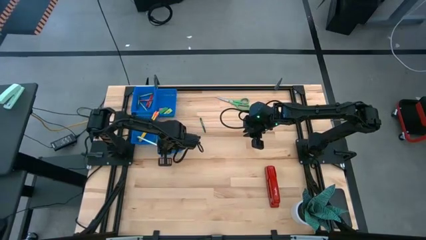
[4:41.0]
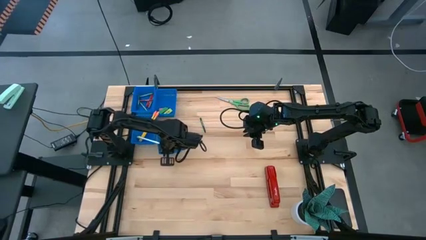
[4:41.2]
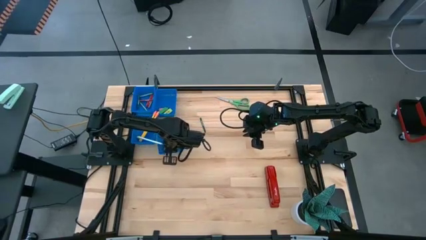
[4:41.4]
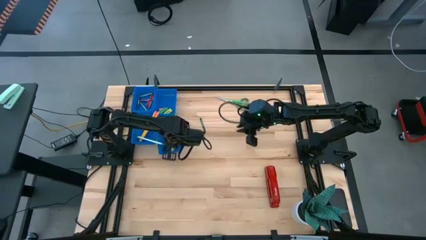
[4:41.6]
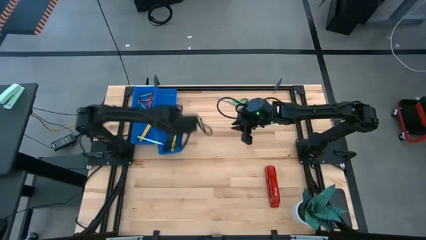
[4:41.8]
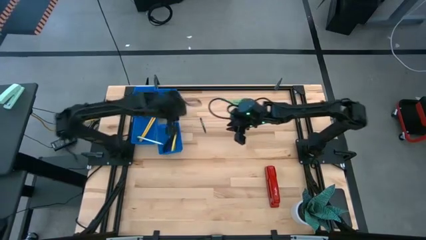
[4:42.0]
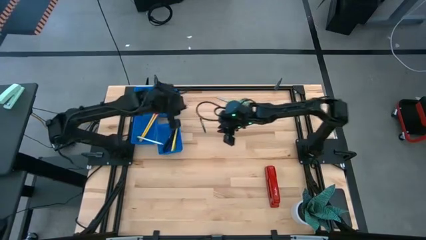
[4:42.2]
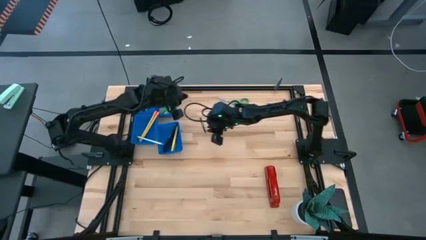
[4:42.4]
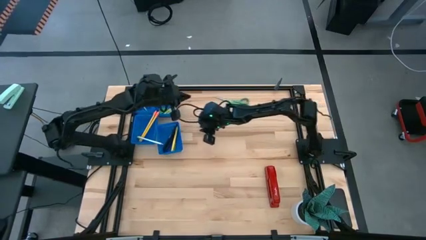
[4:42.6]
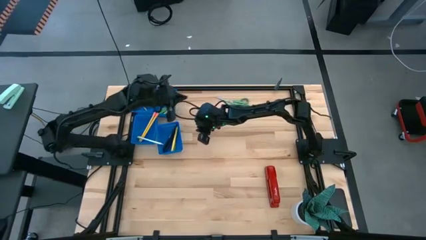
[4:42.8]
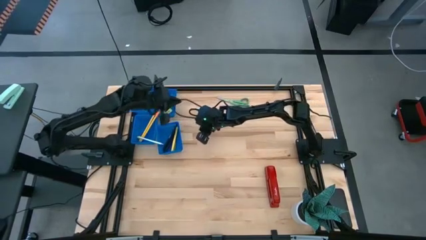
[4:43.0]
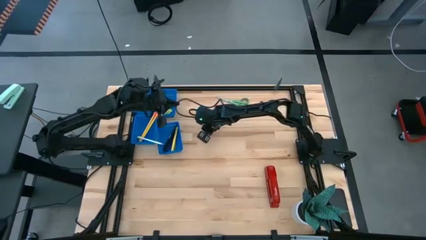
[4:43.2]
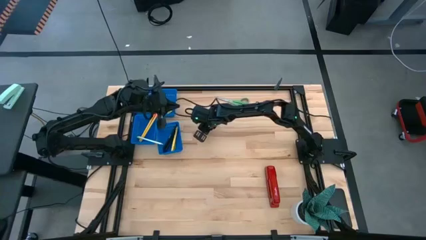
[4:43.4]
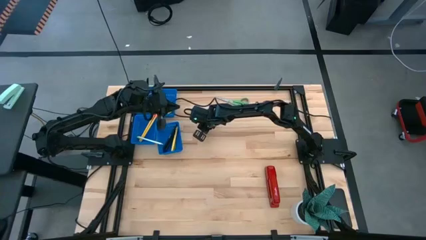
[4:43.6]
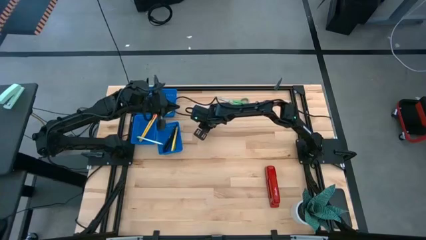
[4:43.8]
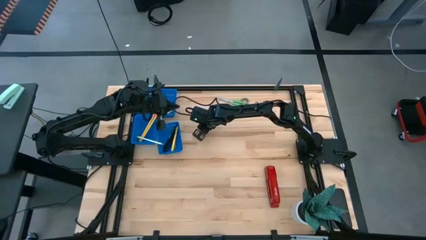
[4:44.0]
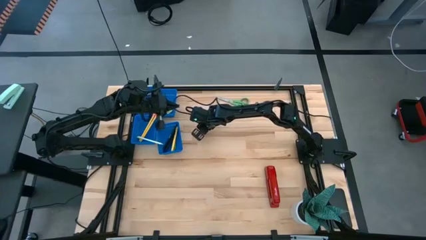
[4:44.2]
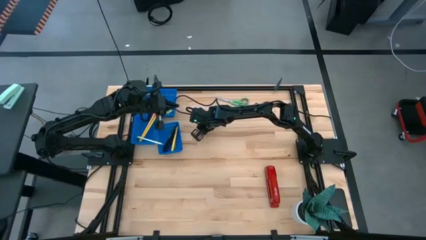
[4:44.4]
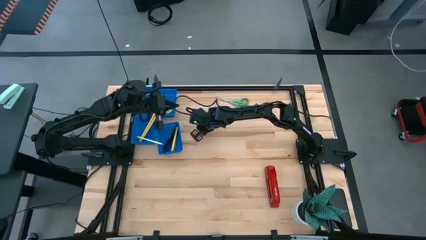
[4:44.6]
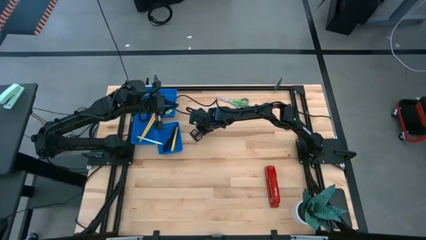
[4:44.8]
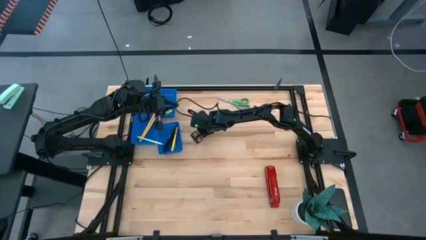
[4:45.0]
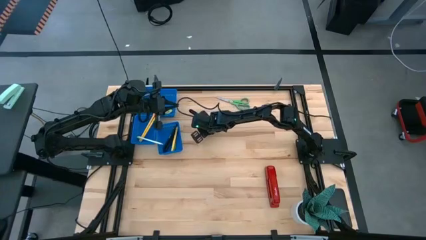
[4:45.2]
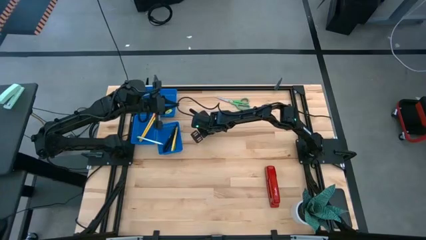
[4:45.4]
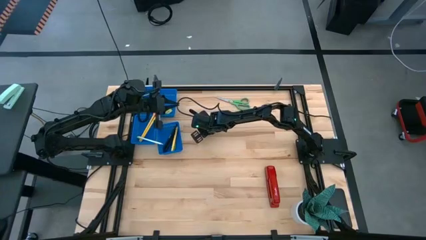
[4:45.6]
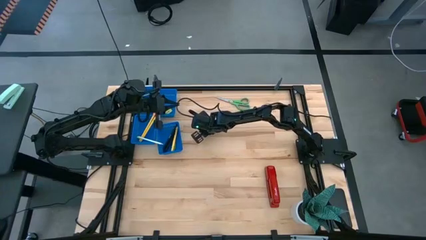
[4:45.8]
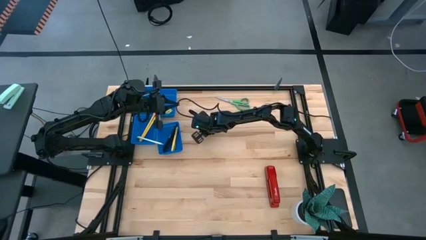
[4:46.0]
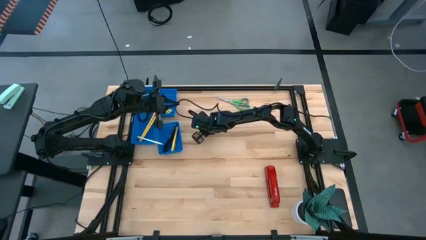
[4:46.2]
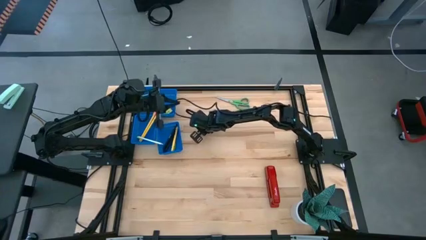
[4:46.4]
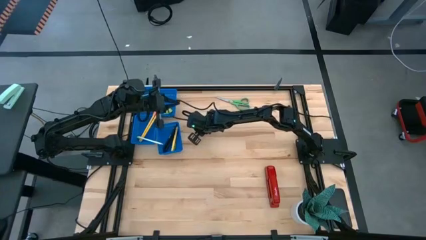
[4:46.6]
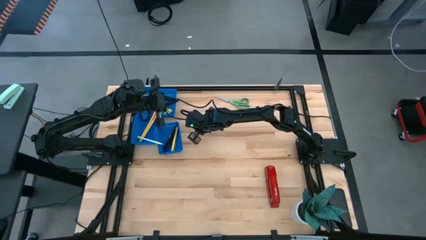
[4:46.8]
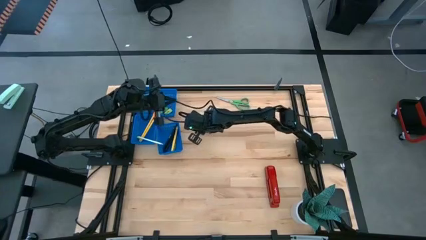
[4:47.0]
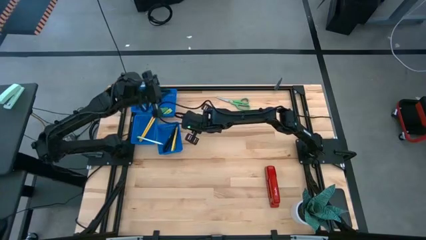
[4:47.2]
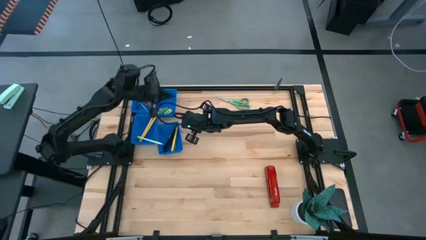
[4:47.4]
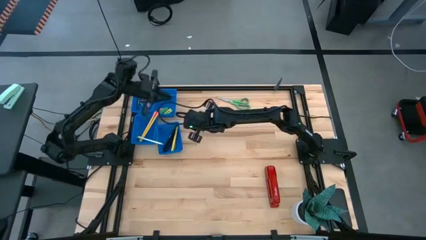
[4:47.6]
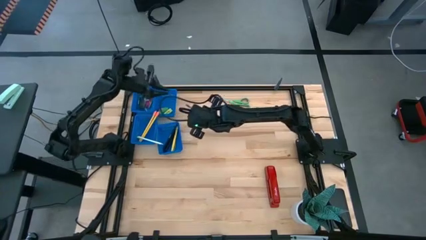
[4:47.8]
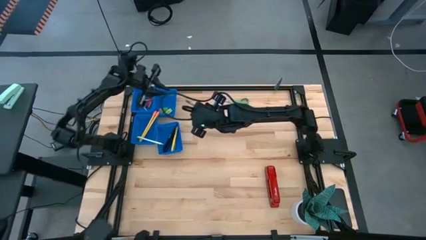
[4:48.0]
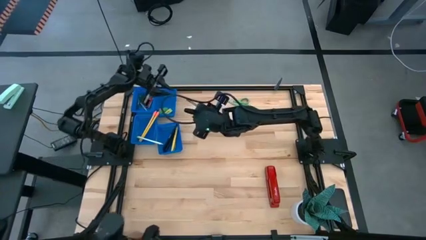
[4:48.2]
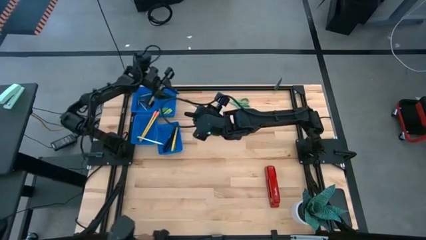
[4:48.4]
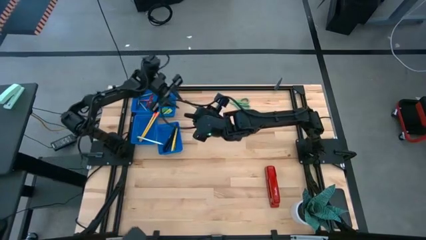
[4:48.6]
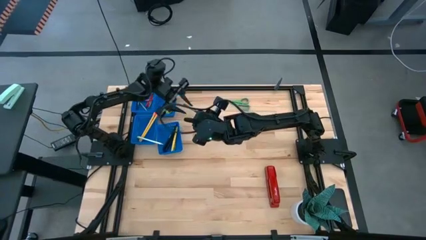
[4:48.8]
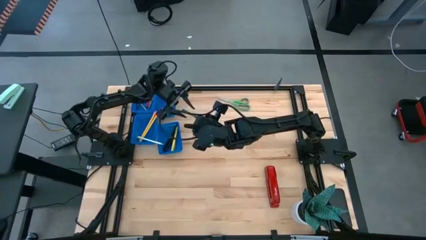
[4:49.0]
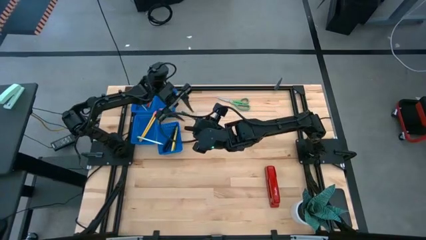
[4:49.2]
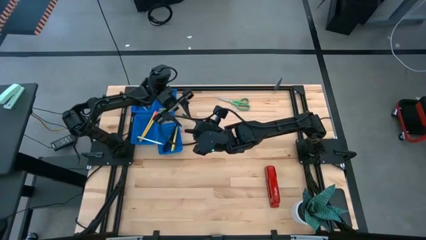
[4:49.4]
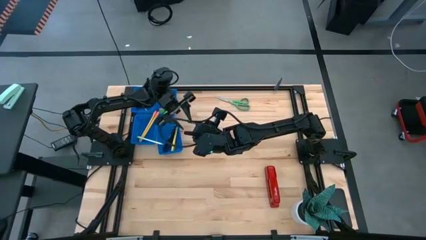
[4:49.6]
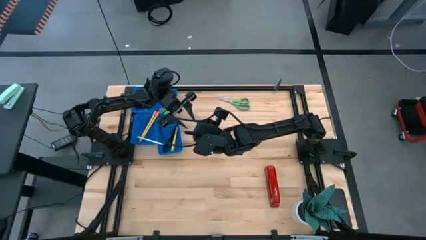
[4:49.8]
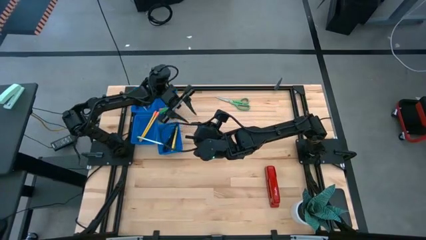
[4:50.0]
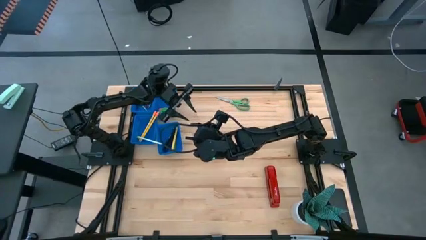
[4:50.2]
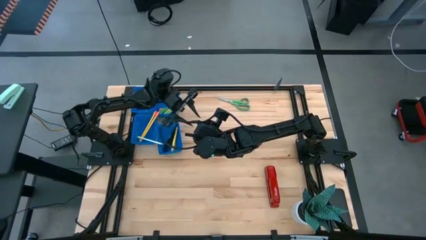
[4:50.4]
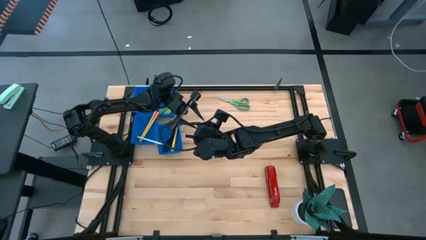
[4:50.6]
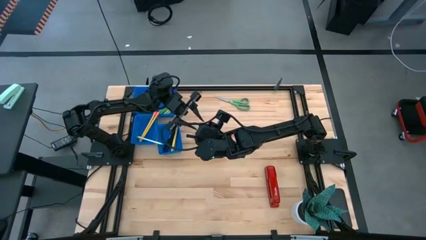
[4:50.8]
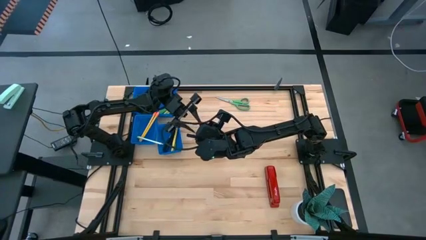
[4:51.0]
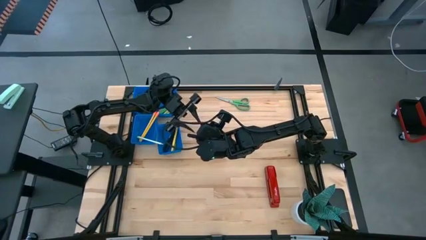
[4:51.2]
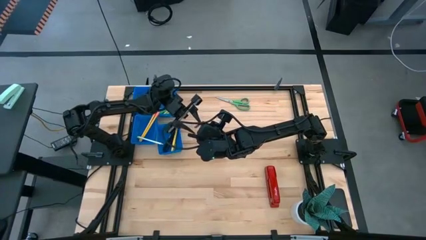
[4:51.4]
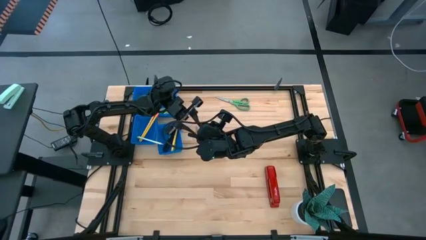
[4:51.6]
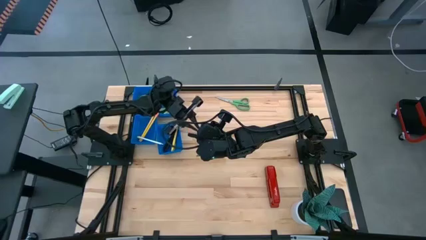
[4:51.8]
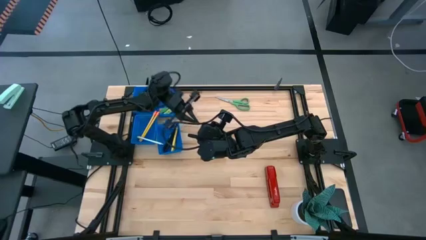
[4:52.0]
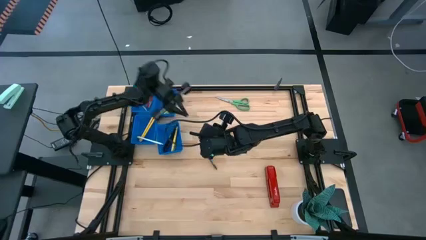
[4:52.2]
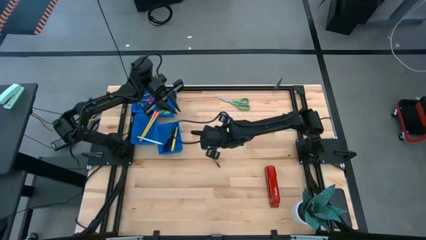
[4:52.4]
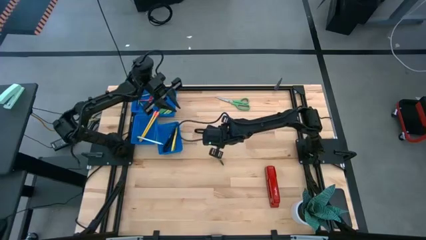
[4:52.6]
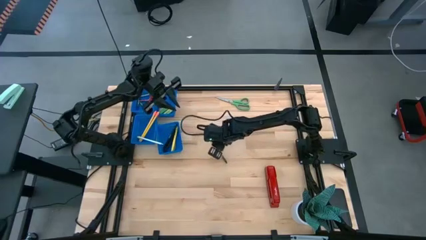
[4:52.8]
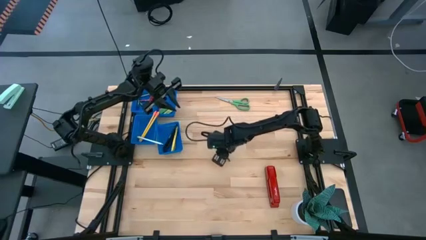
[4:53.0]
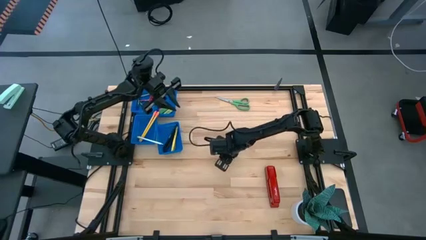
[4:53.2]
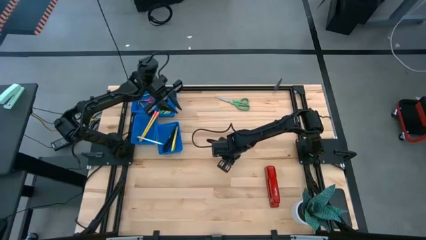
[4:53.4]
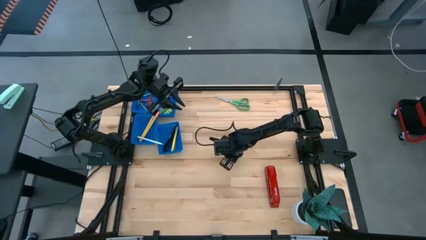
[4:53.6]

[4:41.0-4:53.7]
Task: Sort crayons/erasers/pens/pencils in bins
Put the green crayon into the top left blue bin

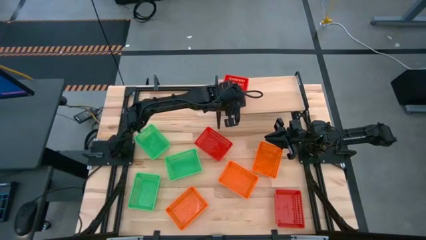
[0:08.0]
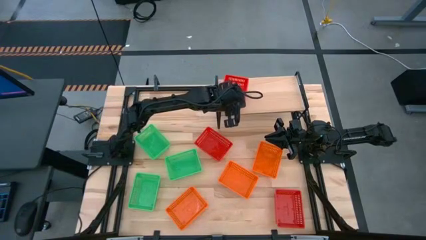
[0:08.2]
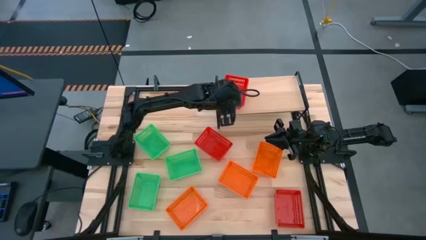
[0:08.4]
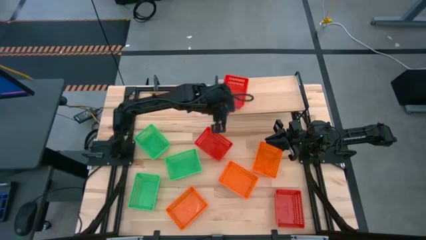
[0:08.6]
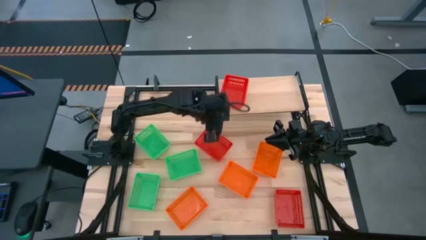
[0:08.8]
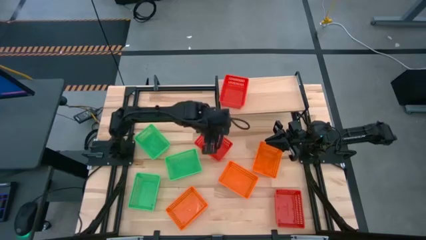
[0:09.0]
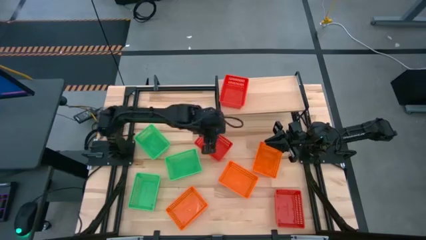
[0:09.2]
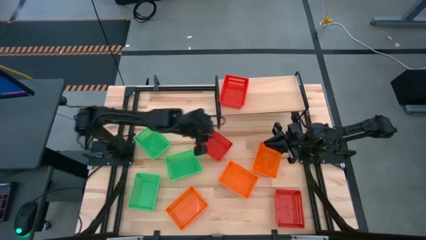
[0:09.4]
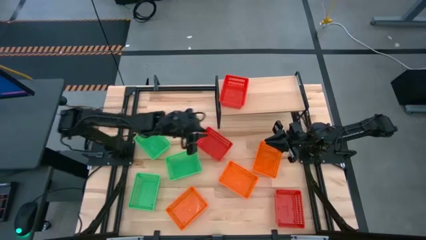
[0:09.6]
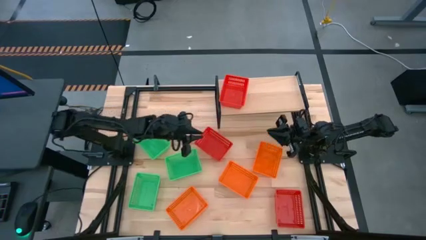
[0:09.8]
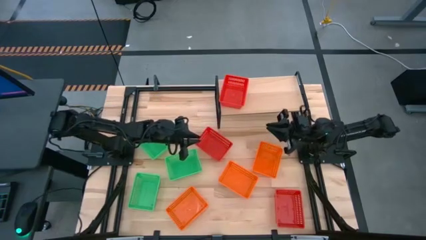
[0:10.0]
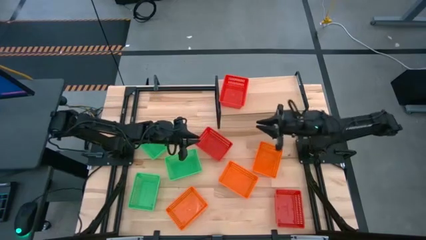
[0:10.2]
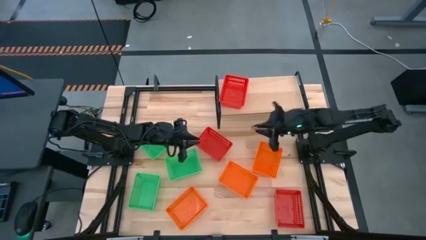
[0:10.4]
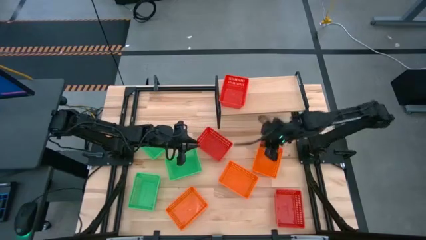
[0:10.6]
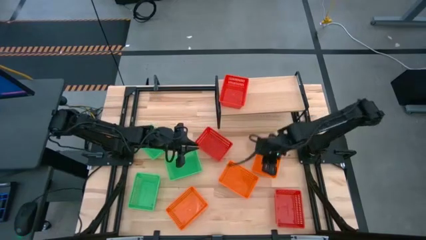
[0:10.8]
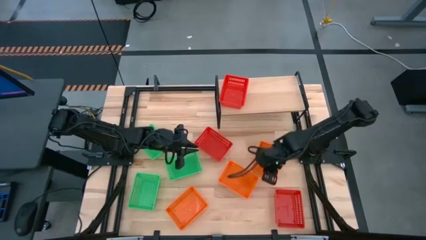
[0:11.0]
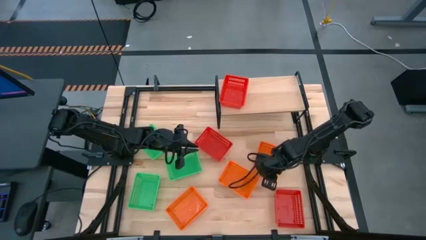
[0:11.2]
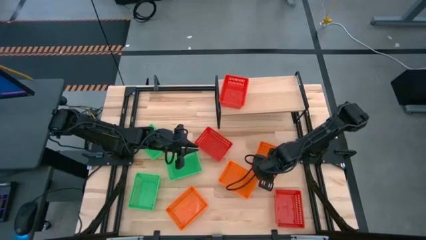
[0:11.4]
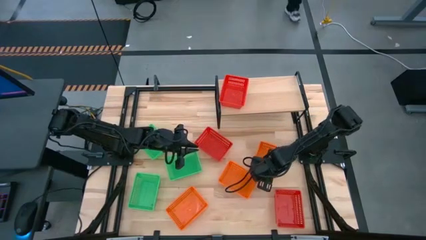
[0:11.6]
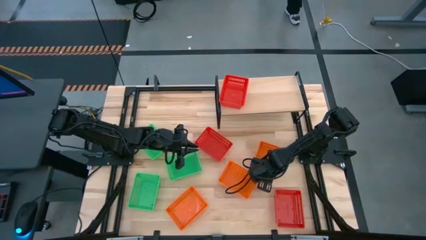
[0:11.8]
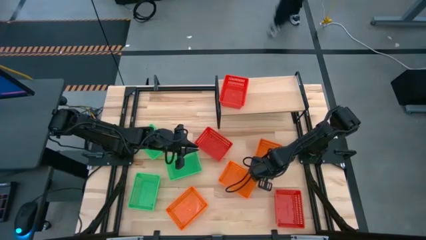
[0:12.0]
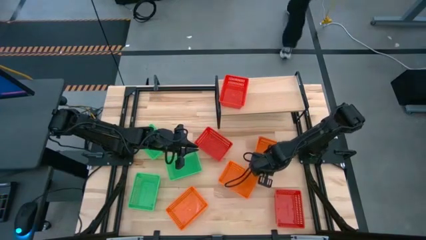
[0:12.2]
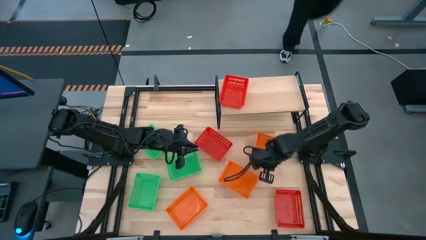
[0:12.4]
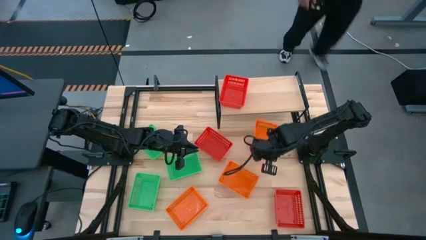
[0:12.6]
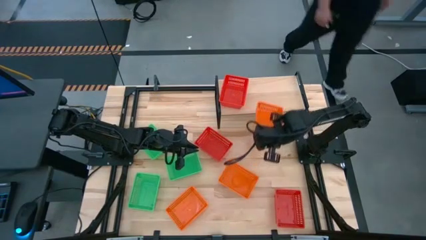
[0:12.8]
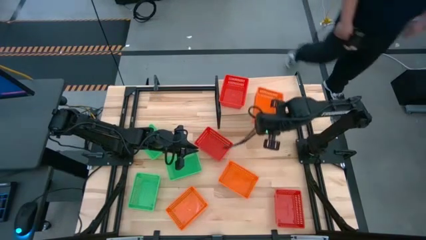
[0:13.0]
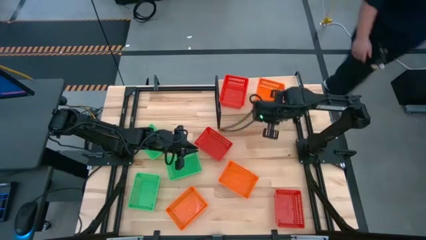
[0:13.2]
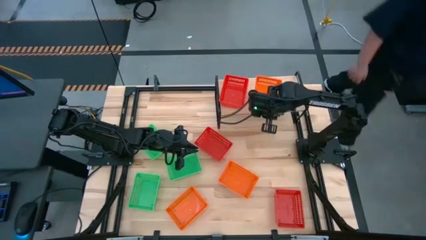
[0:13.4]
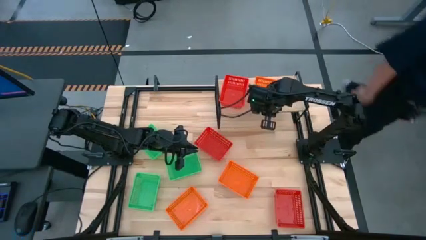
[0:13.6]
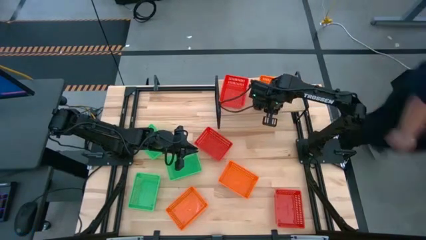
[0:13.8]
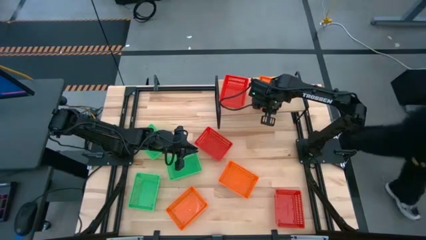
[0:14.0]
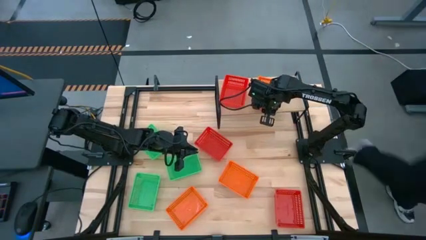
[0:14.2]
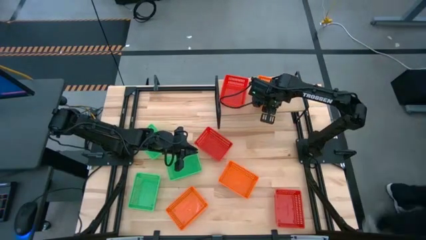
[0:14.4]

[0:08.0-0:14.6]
Task: Stack baskets on shelf by color
Put the top orange bin on the shelf
